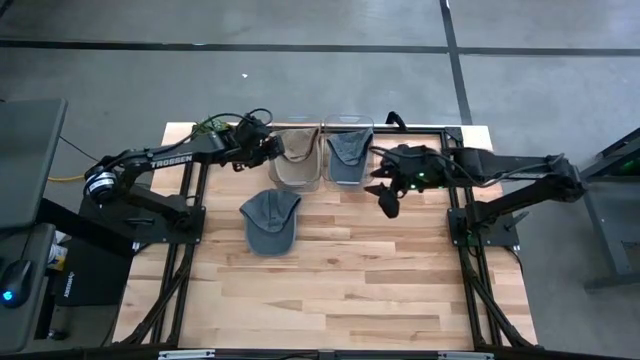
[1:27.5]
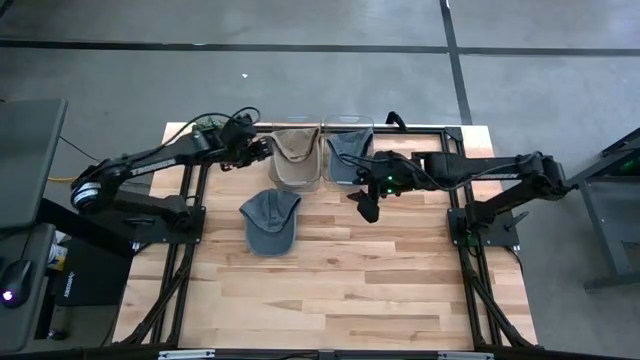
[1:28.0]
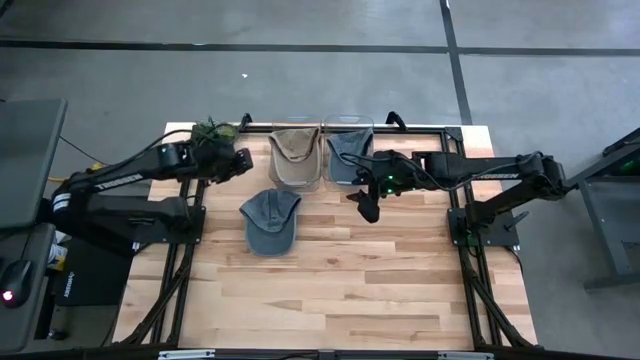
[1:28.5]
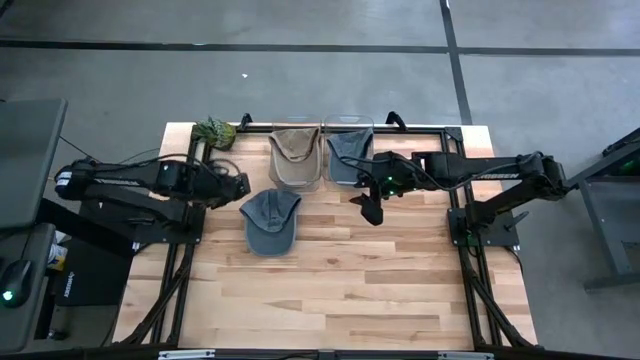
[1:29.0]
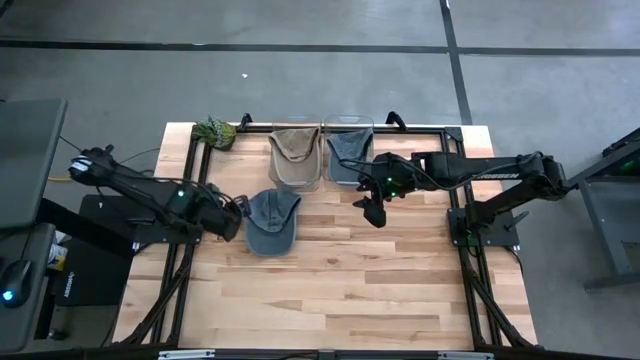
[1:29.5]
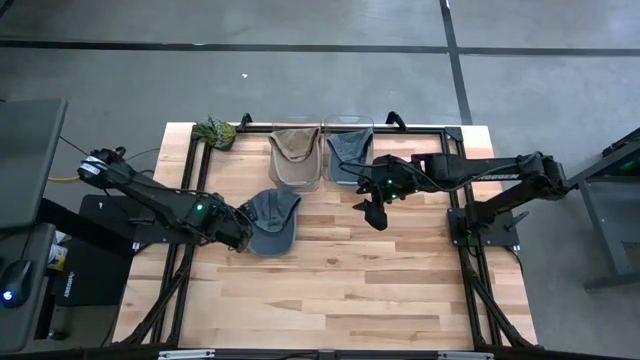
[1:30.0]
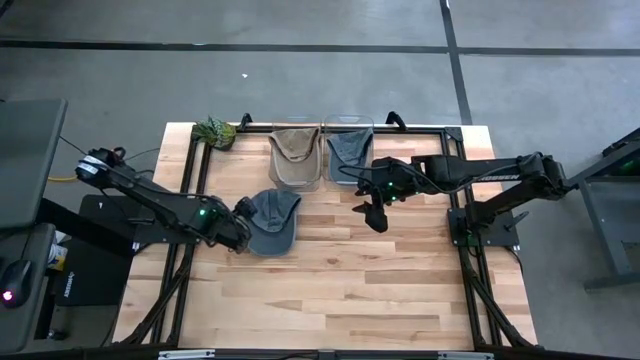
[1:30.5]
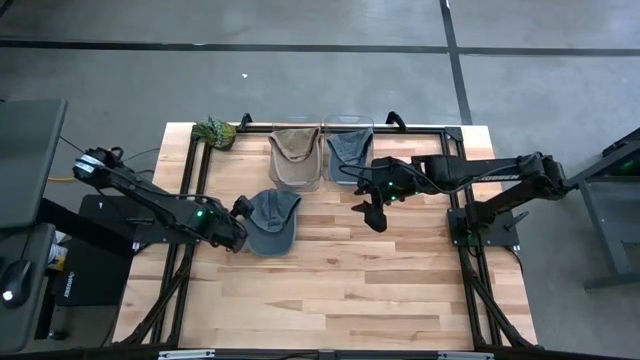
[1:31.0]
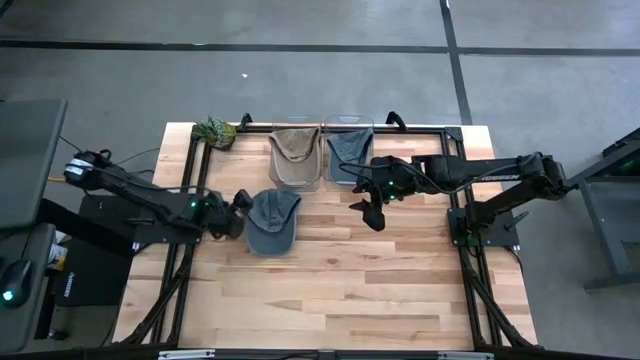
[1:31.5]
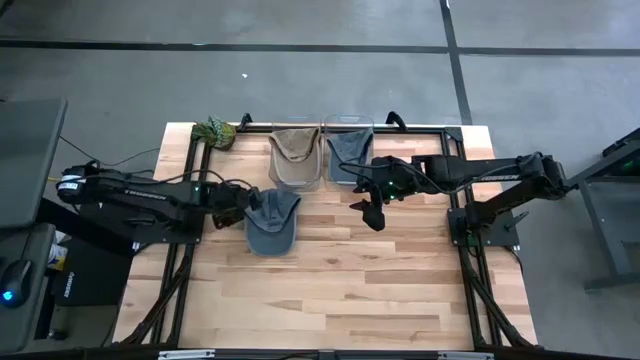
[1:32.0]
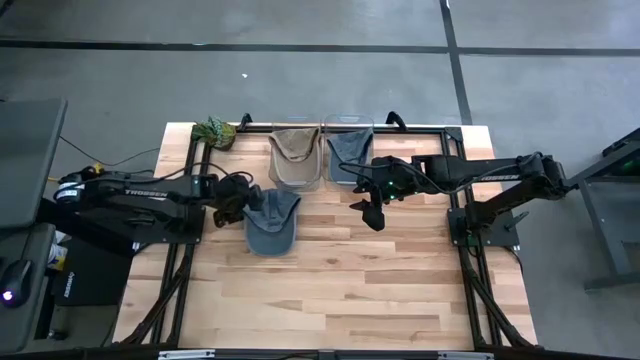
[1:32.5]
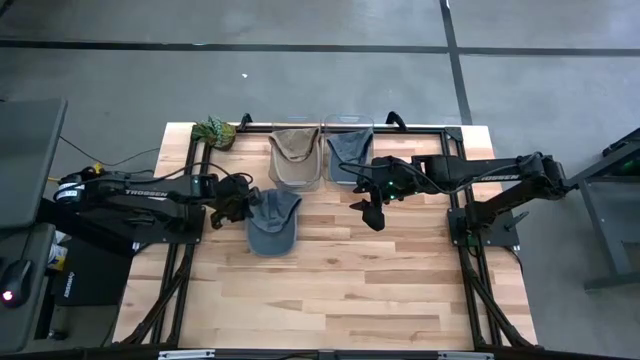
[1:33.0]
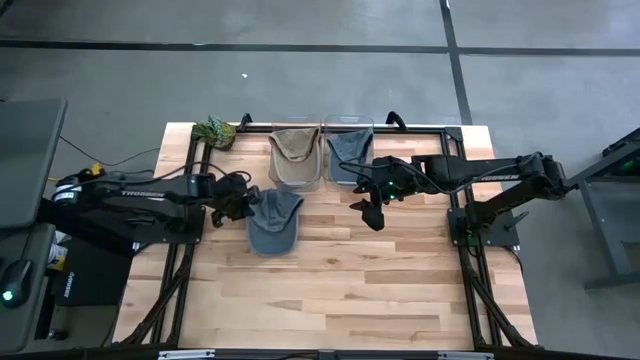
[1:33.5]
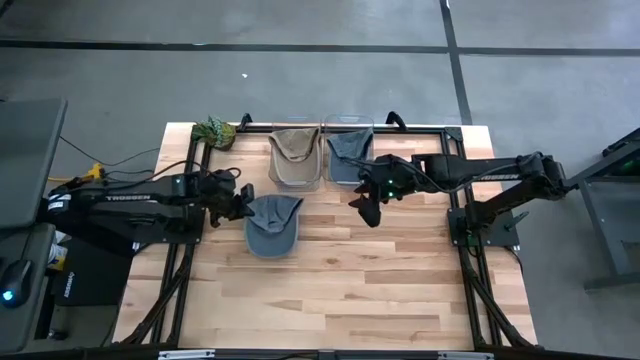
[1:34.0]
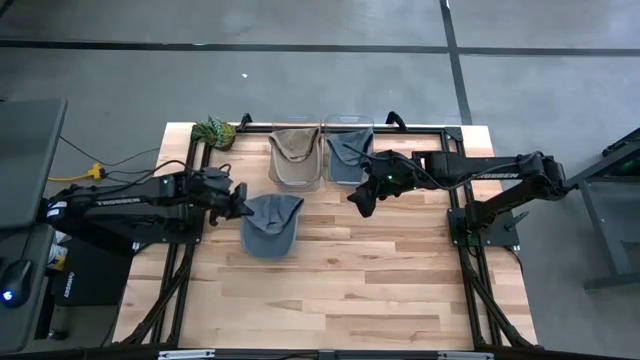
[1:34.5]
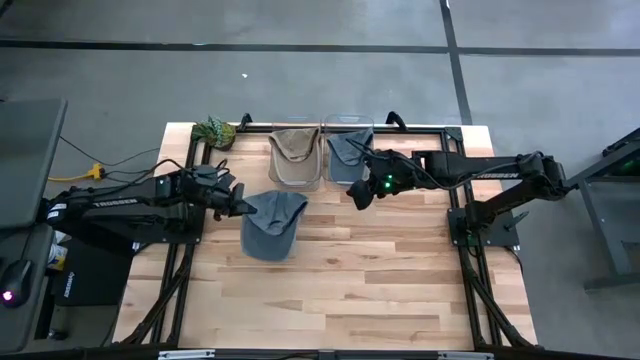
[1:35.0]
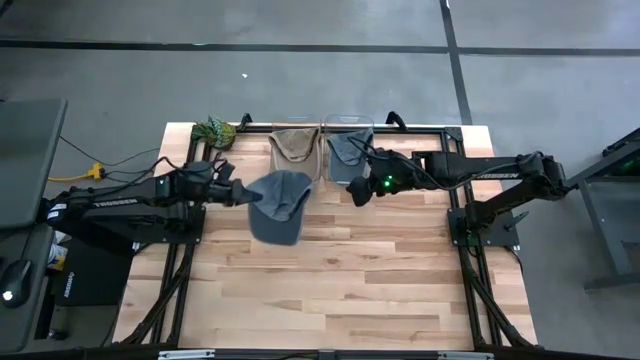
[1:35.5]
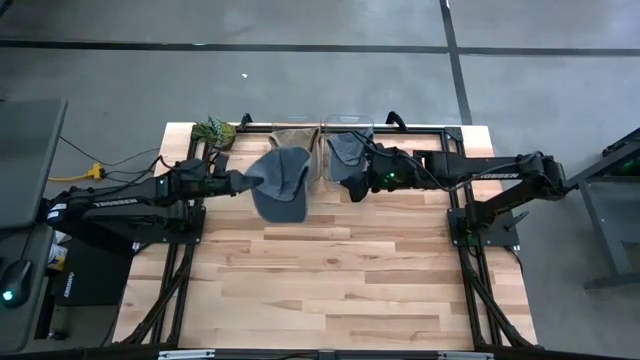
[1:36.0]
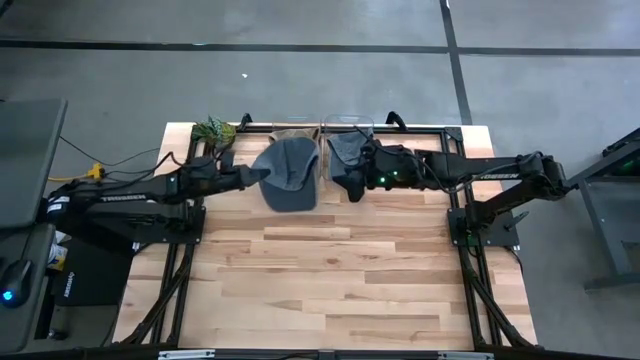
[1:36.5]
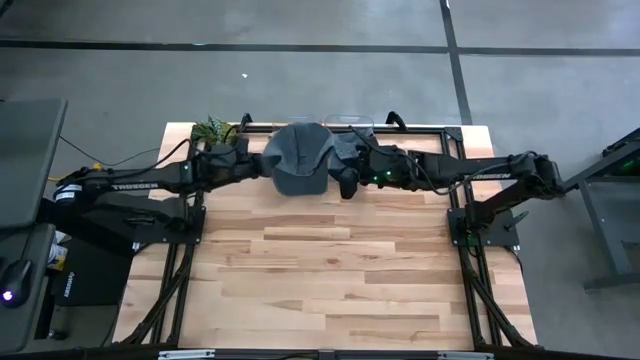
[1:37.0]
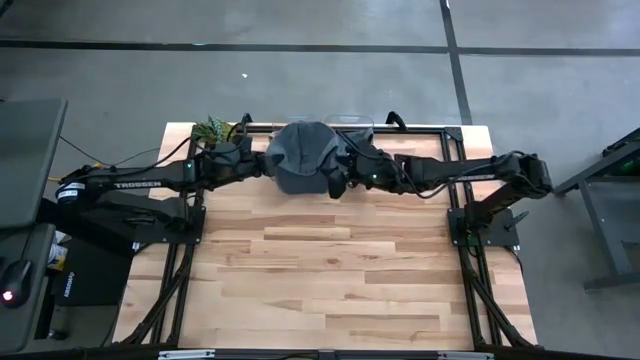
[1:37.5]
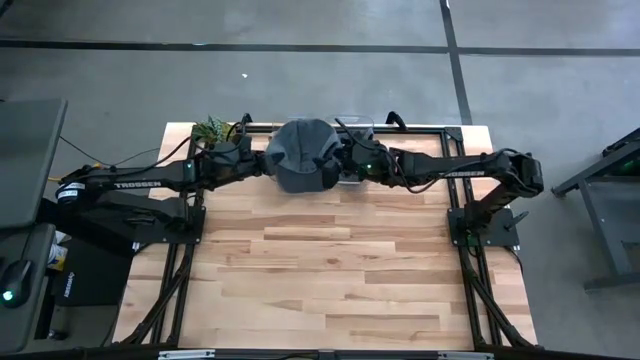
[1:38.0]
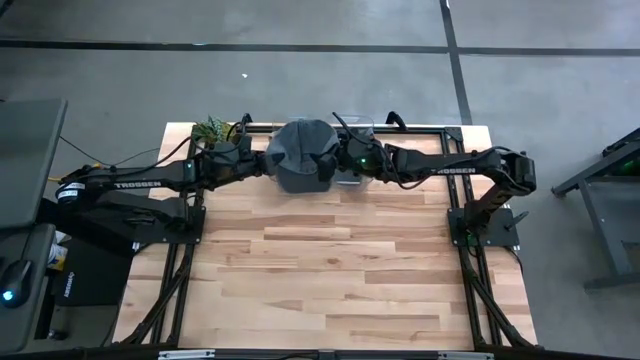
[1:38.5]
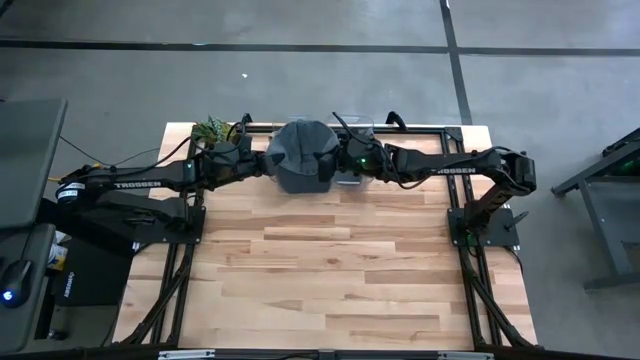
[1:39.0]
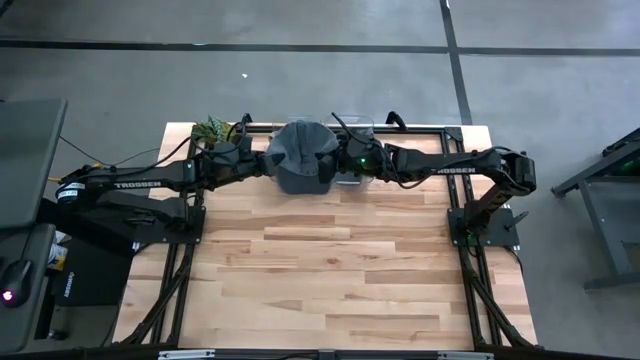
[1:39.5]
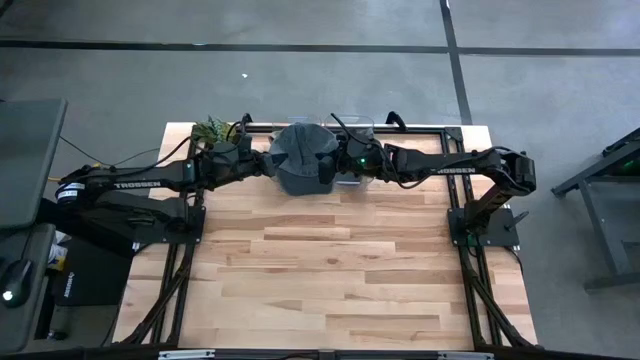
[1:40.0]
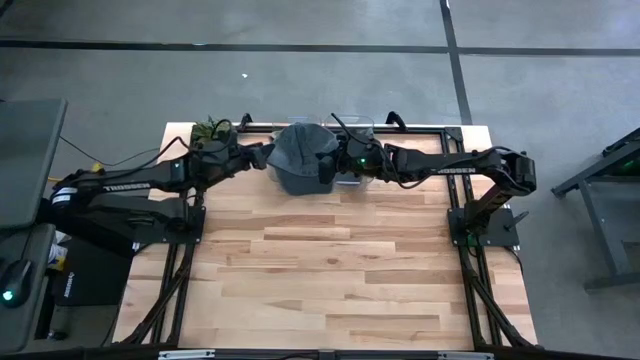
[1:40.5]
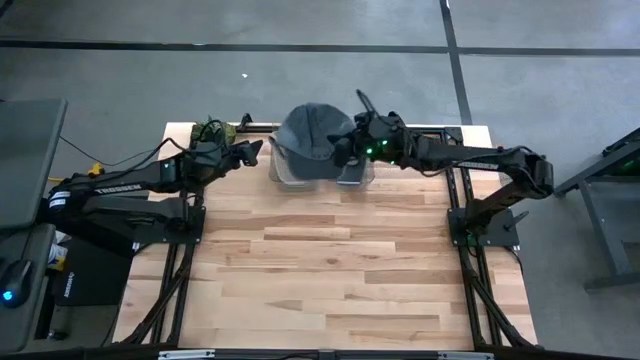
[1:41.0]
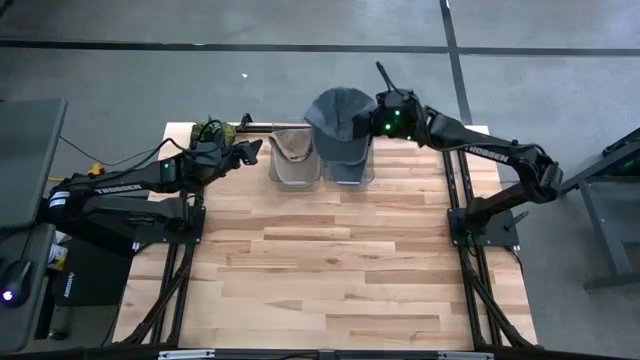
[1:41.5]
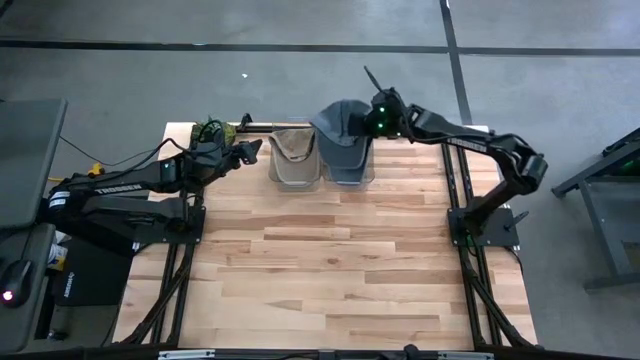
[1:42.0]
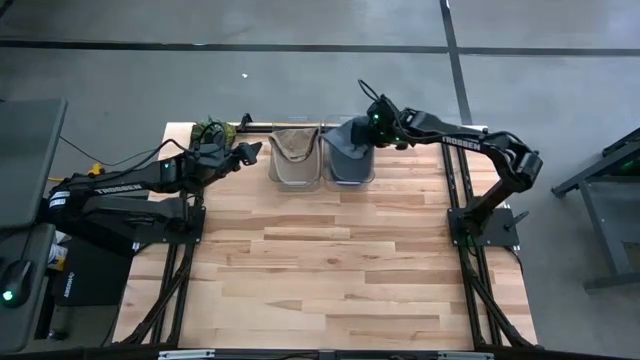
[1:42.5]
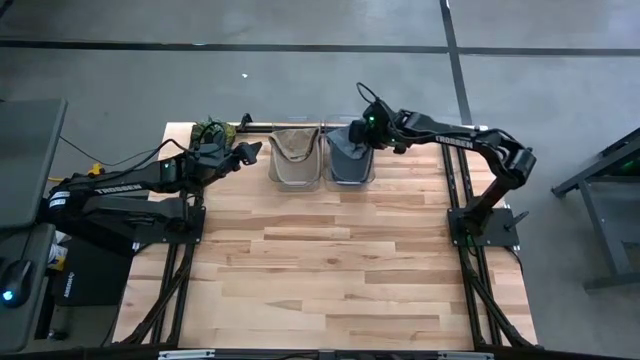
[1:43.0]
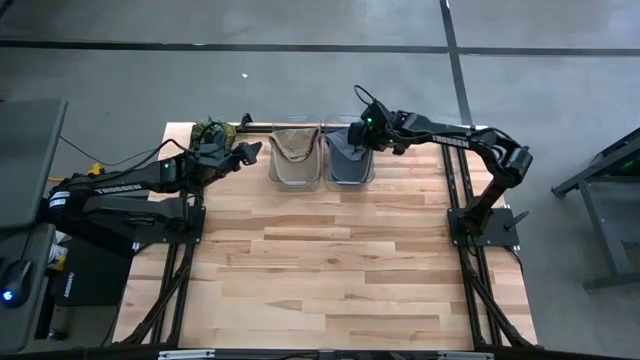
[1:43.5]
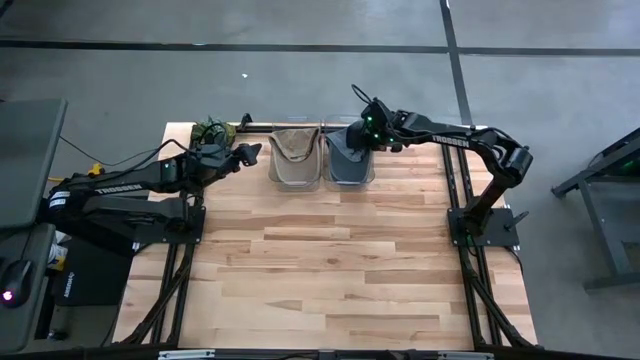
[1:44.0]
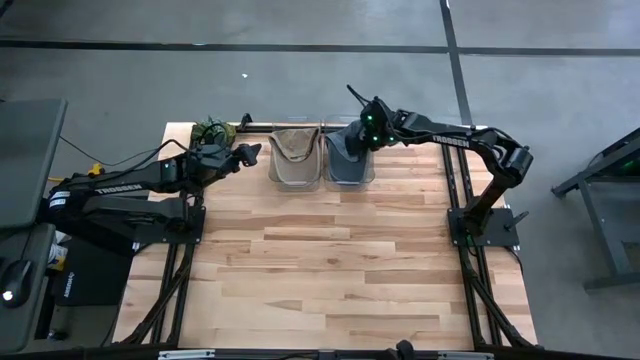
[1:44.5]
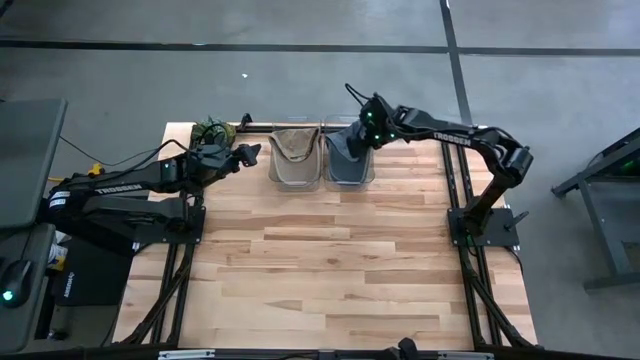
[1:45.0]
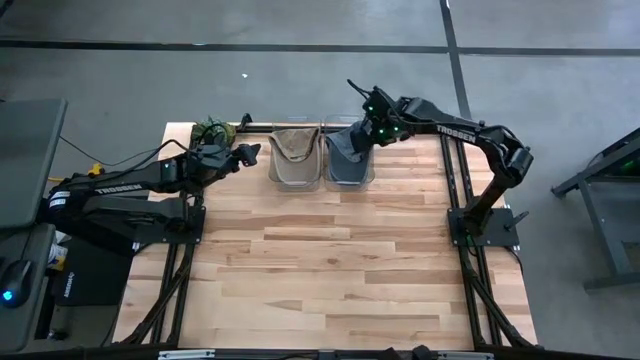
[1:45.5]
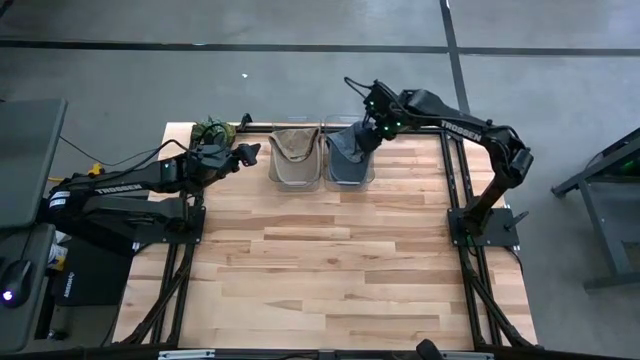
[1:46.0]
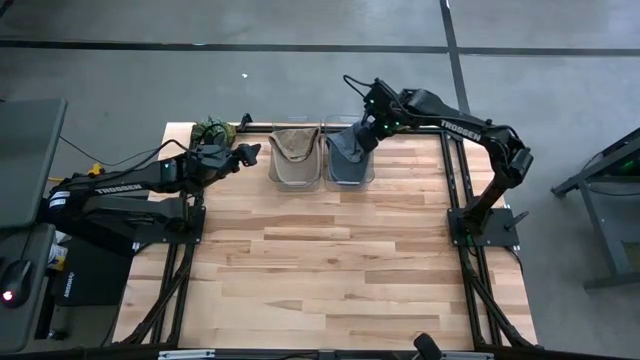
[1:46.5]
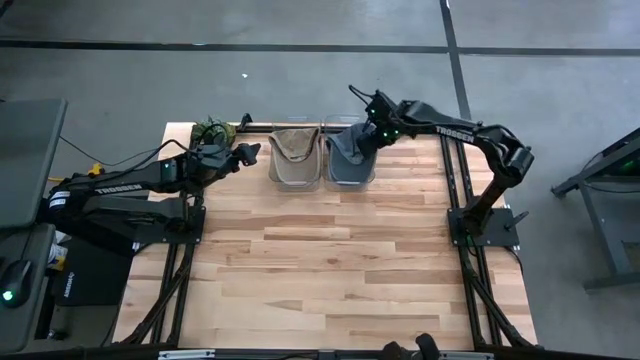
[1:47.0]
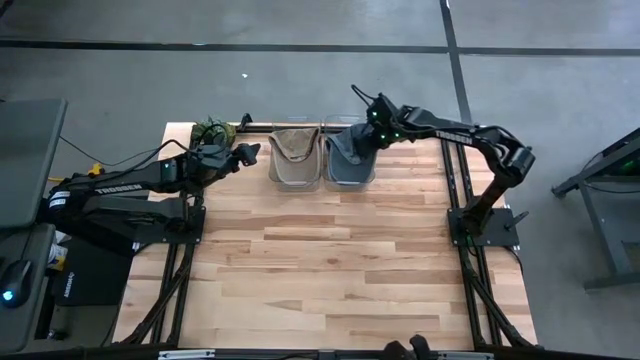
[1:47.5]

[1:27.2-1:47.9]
Task: Pick & Place hat
Put the blue cap into the right transparent bin
